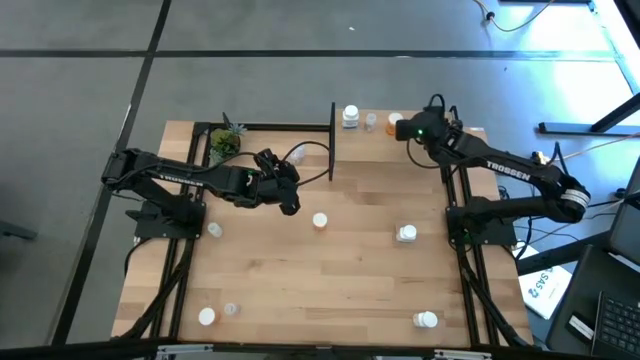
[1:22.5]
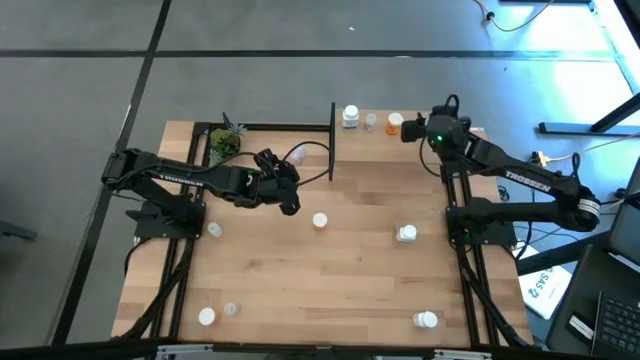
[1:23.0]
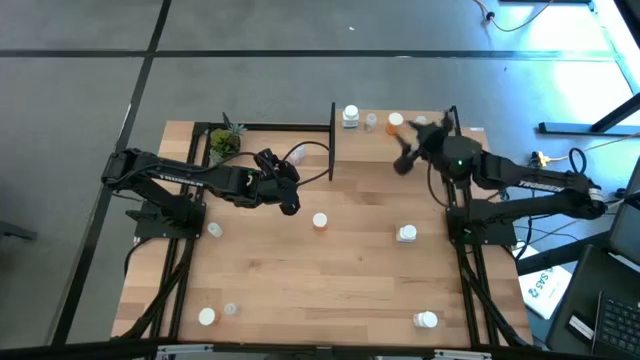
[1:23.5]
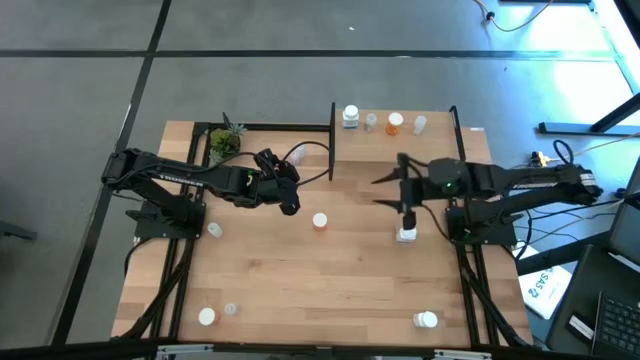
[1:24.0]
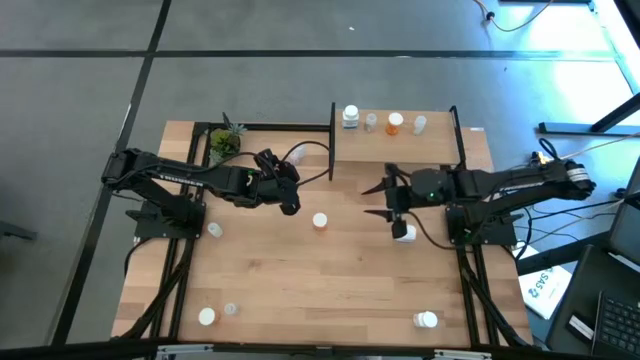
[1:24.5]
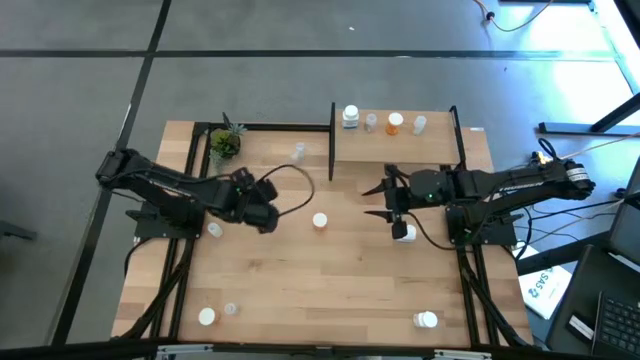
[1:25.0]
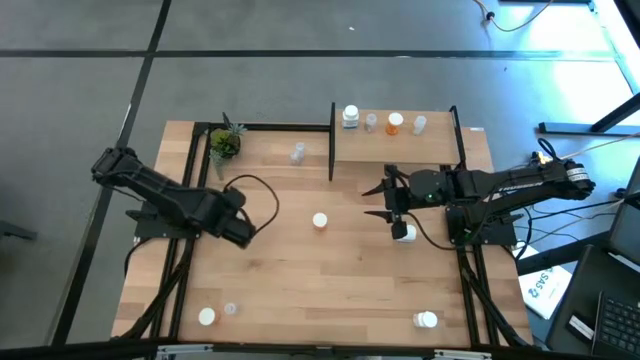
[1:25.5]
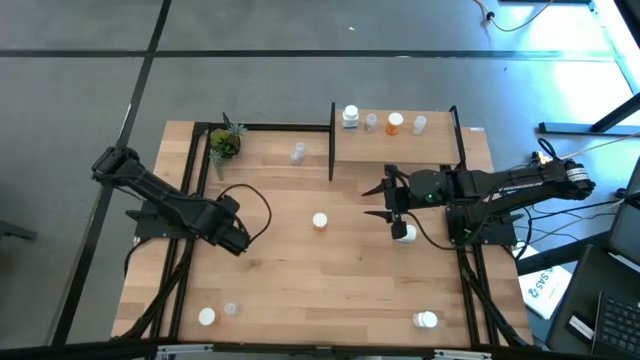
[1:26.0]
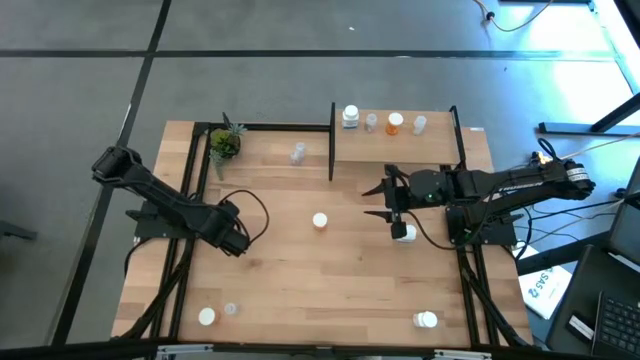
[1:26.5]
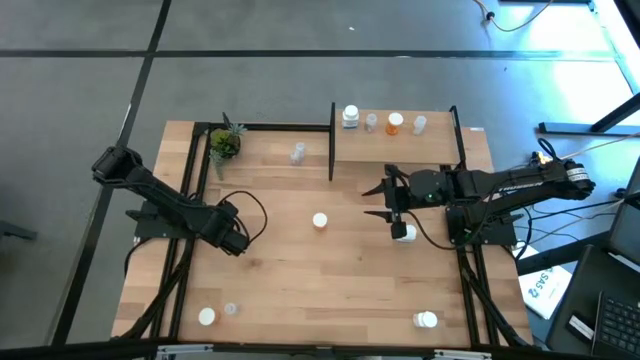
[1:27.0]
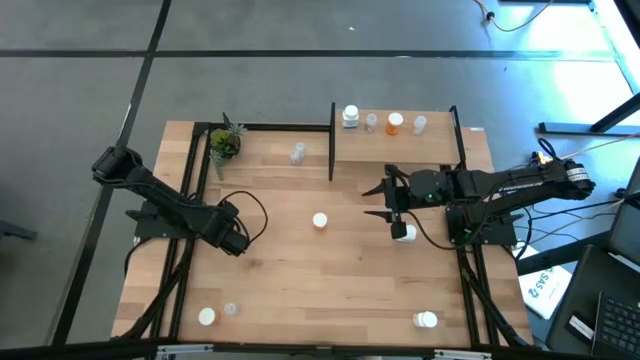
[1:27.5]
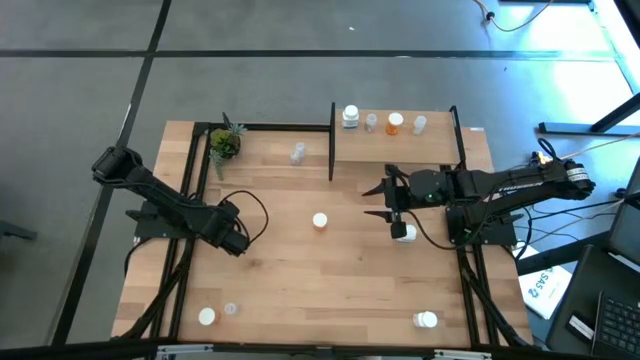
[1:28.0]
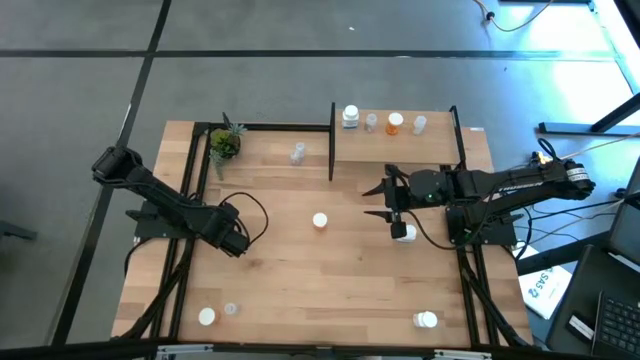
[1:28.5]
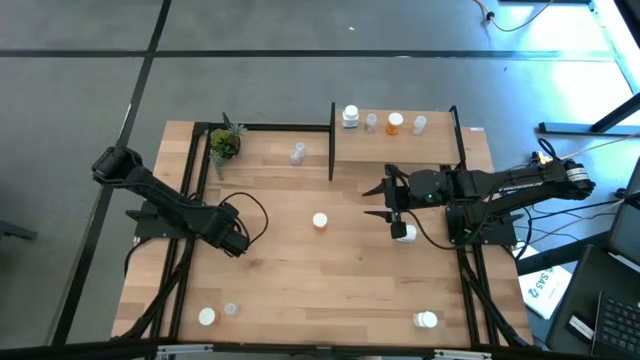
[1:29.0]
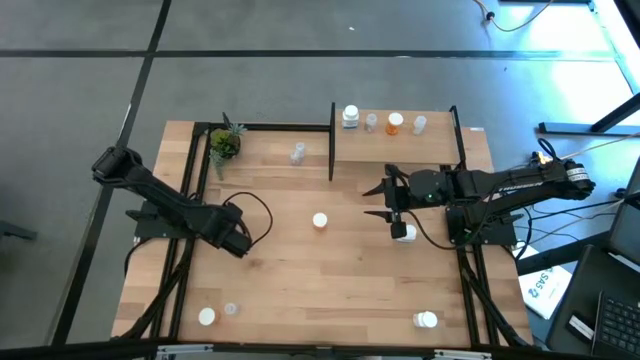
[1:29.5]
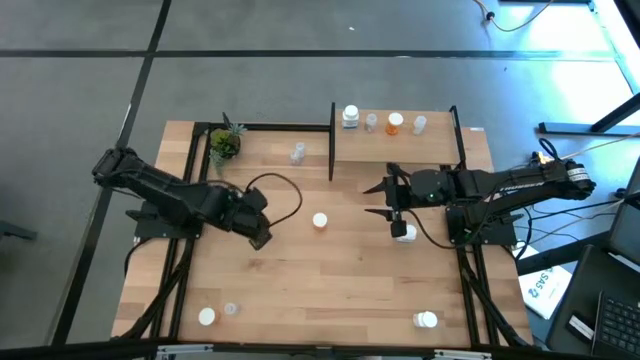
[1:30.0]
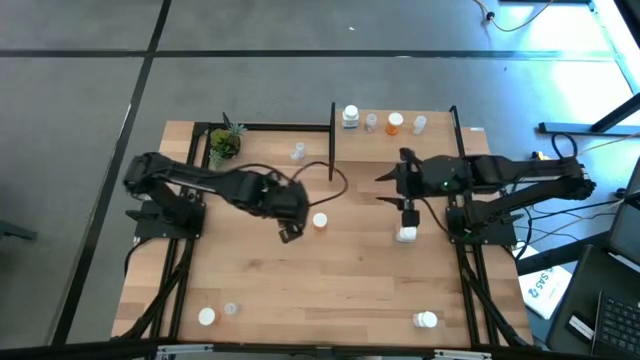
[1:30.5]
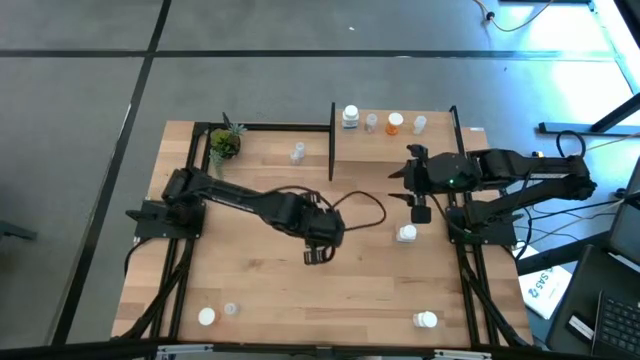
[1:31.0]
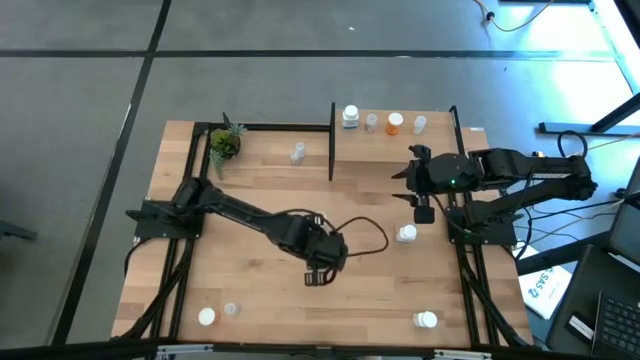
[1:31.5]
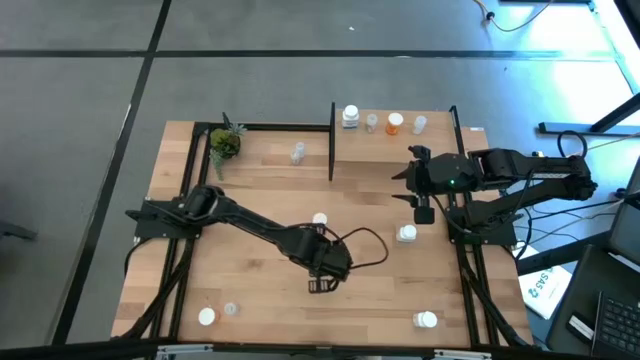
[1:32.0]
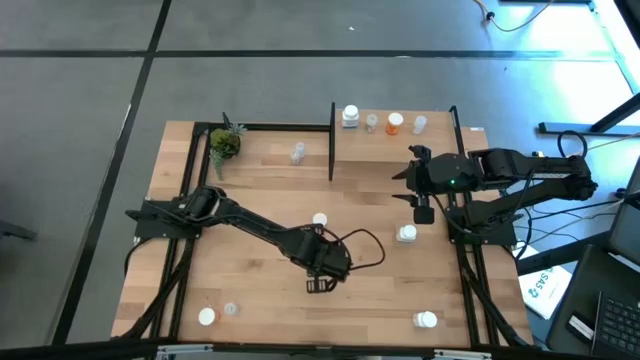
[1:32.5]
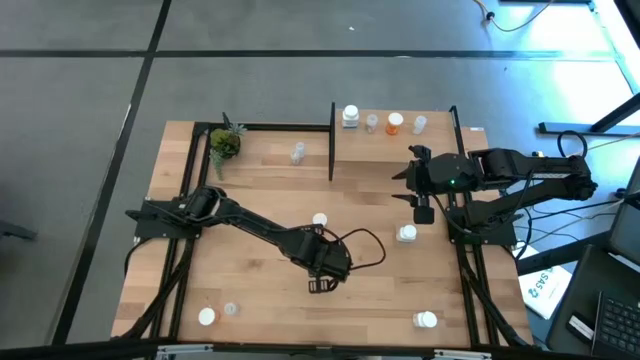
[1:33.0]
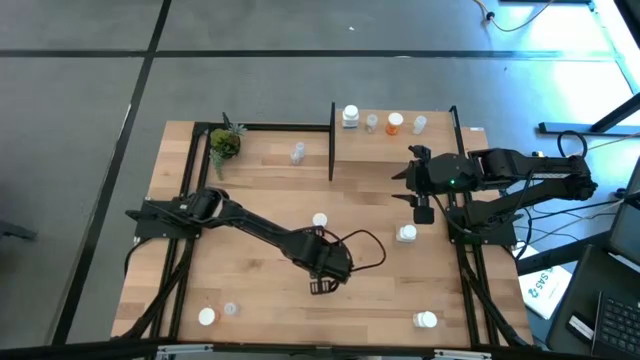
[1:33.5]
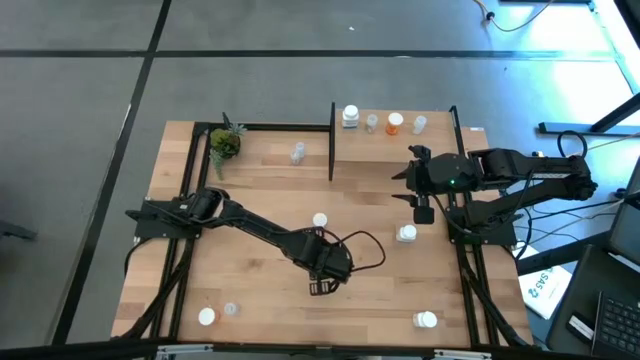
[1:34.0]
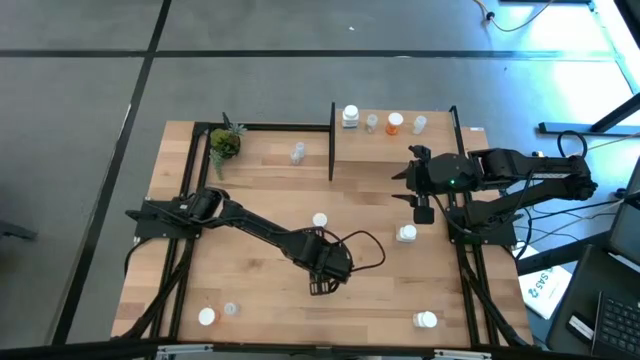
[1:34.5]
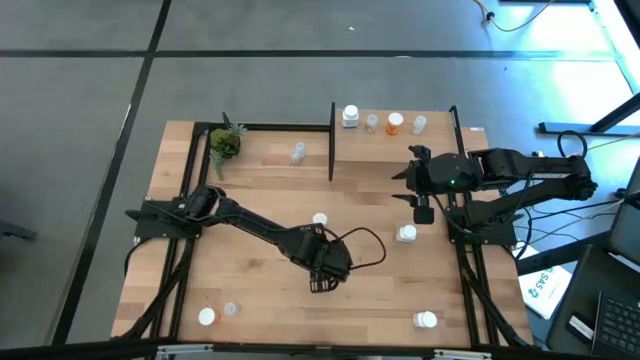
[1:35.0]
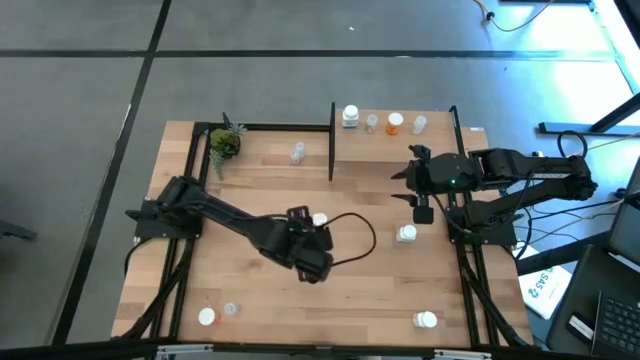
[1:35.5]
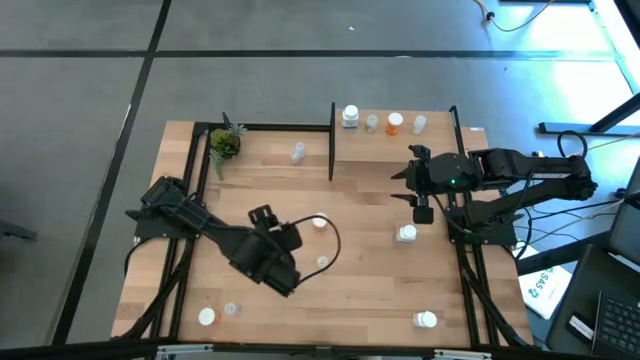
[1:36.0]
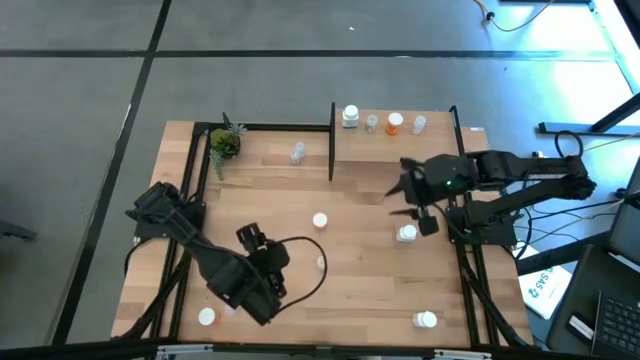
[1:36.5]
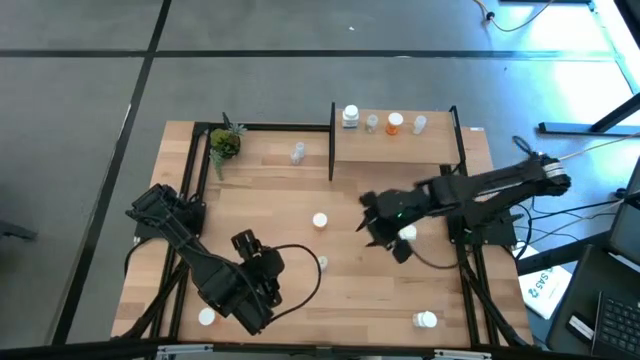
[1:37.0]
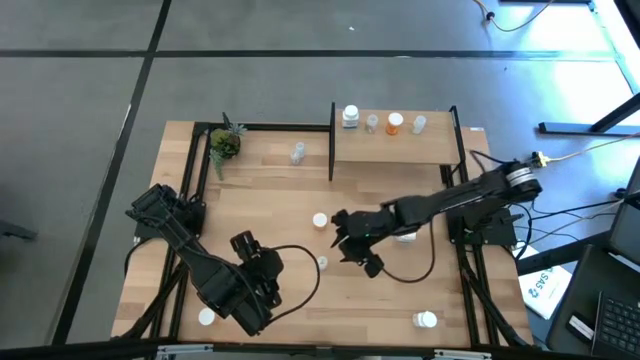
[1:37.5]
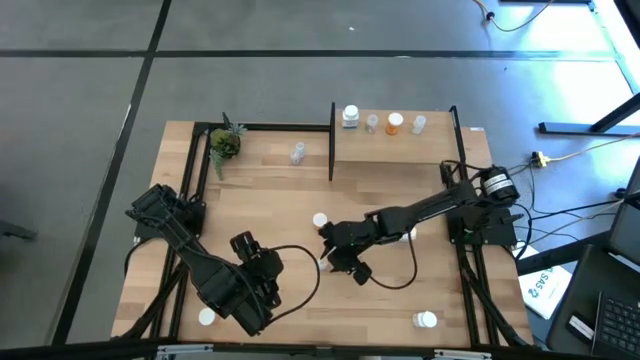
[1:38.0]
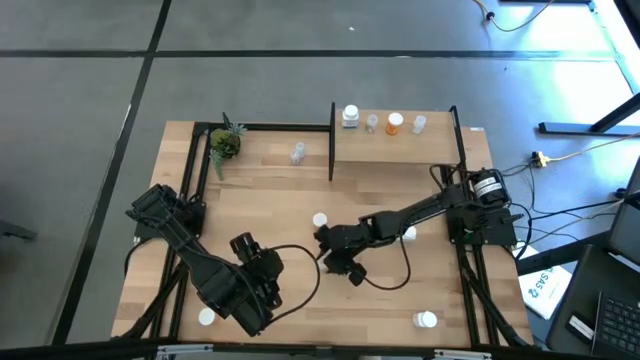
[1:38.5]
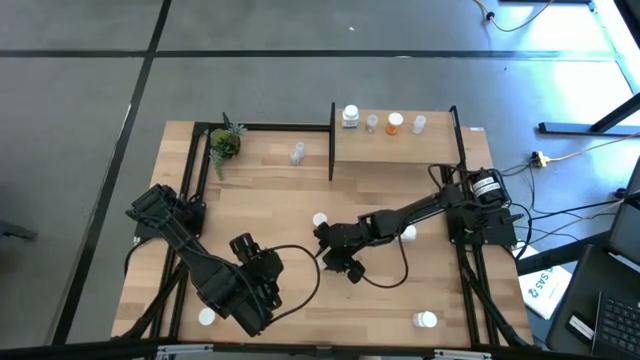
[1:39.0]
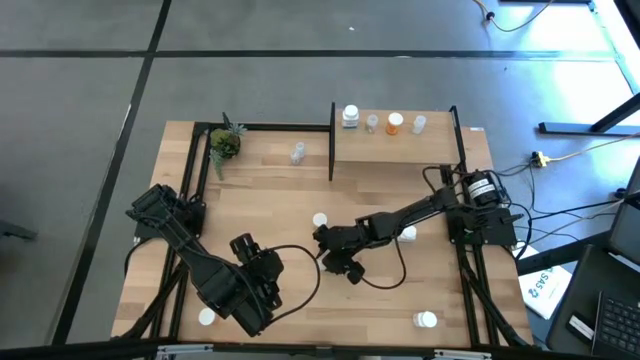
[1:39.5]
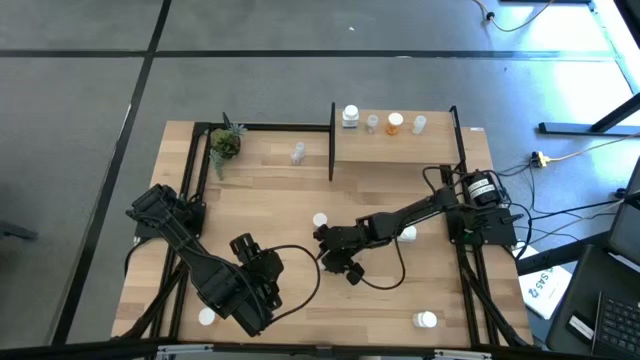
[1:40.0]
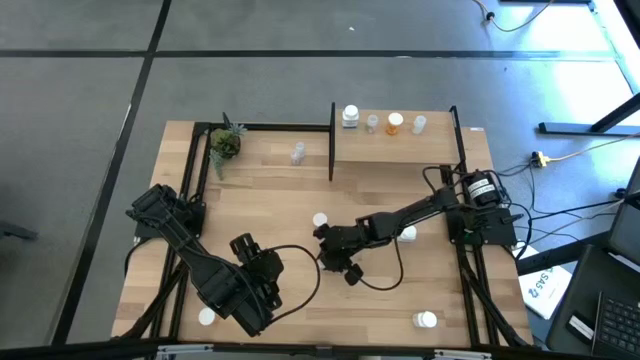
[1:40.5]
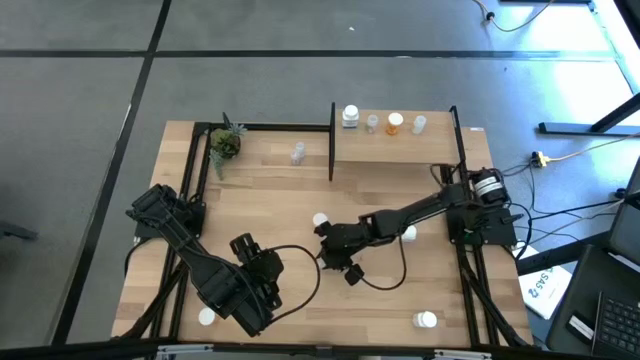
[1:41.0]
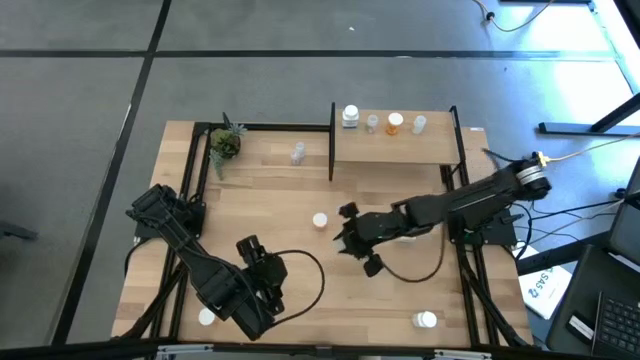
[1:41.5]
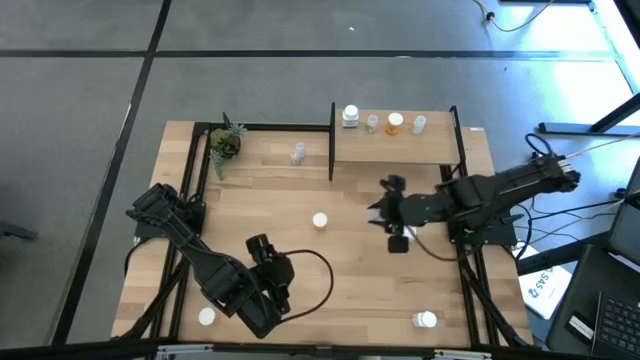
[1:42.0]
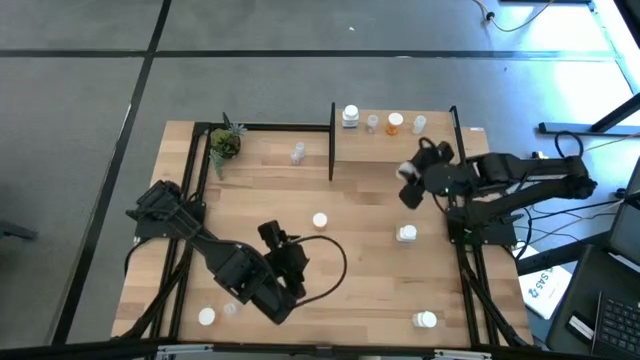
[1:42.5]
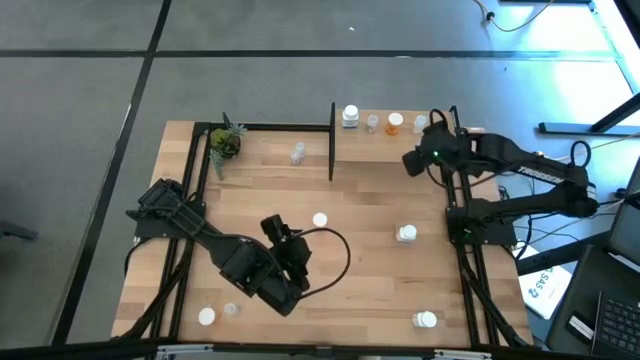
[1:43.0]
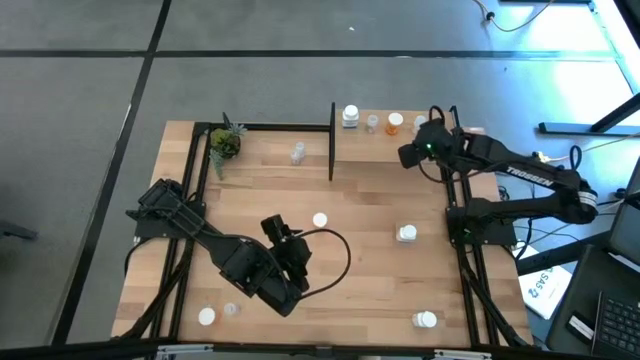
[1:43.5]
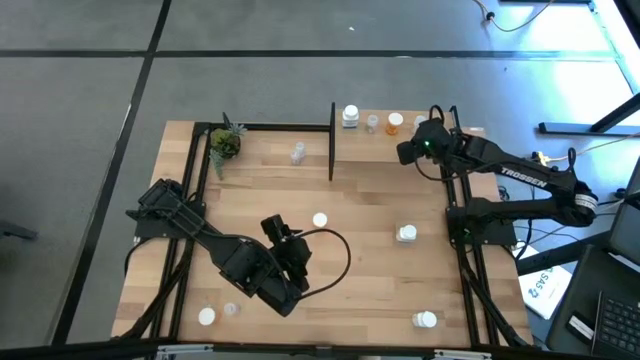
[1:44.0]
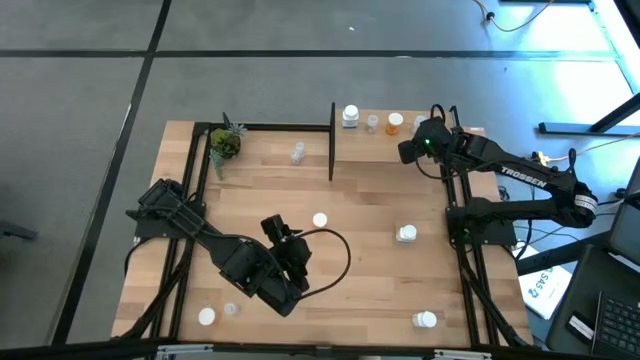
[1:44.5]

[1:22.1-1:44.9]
Task: Pick and place medicine bottles onto shelf by color
Put the bottom yellow transparent pill bottle on the shelf aligned with the other yellow transparent pill bottle
